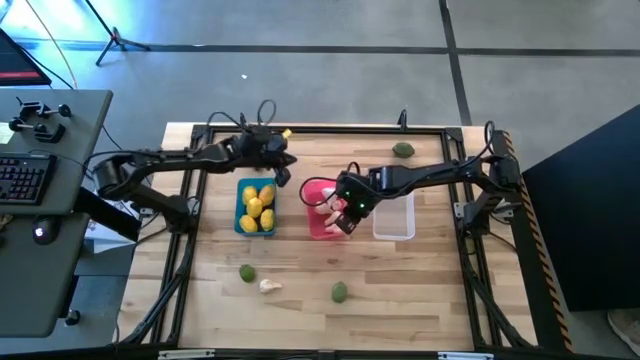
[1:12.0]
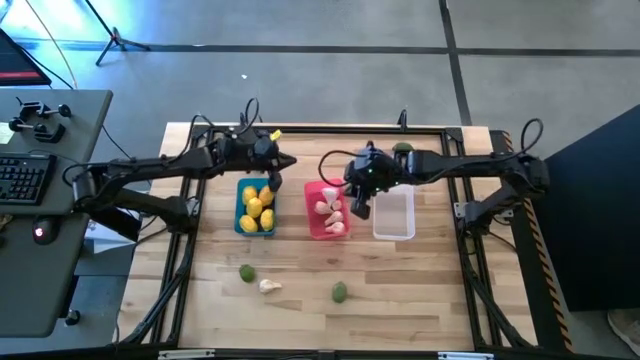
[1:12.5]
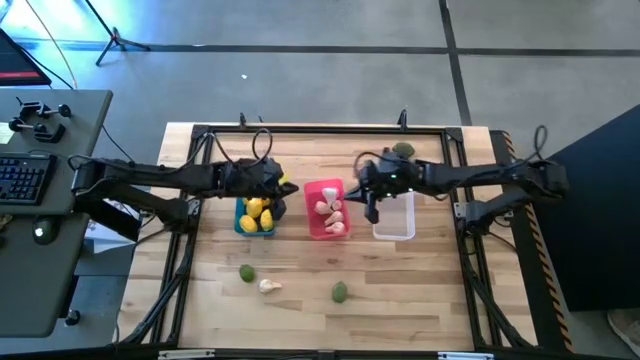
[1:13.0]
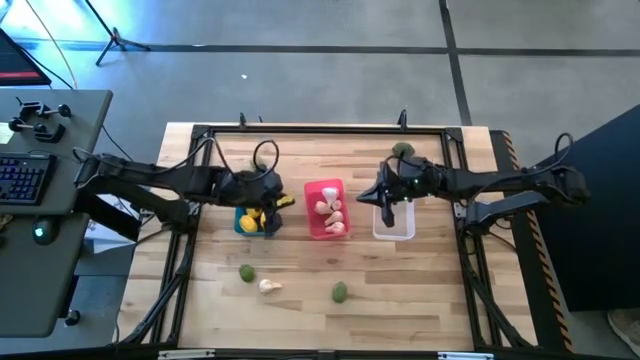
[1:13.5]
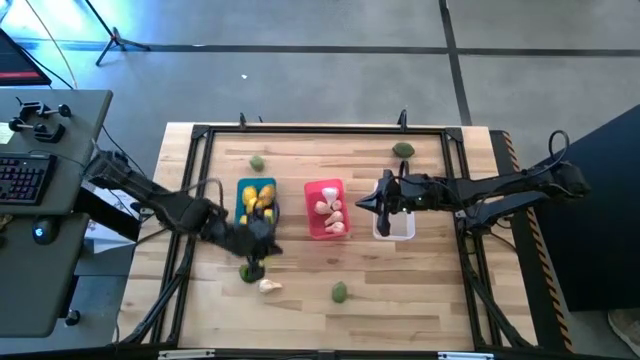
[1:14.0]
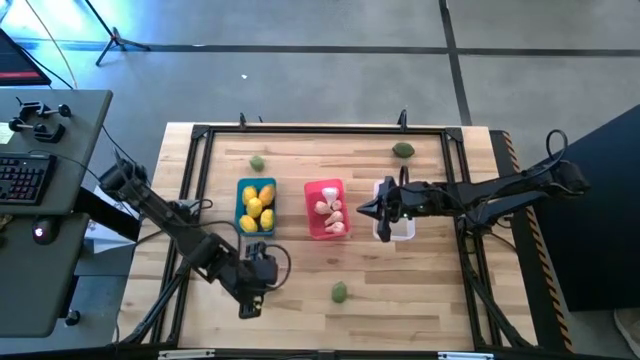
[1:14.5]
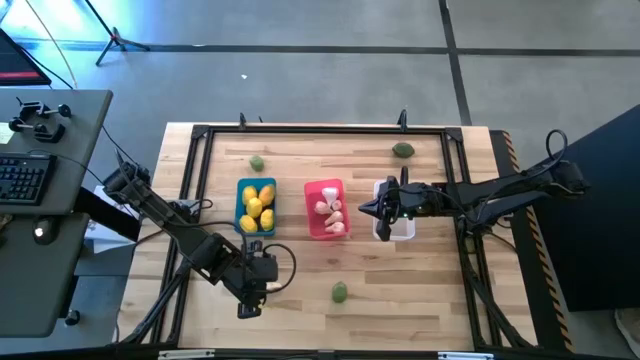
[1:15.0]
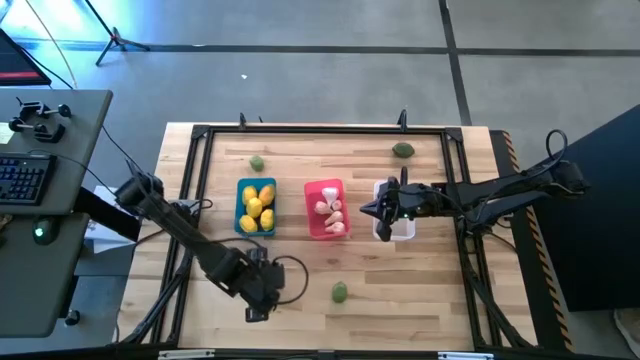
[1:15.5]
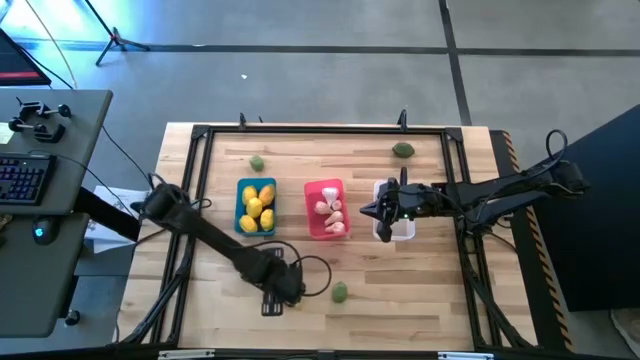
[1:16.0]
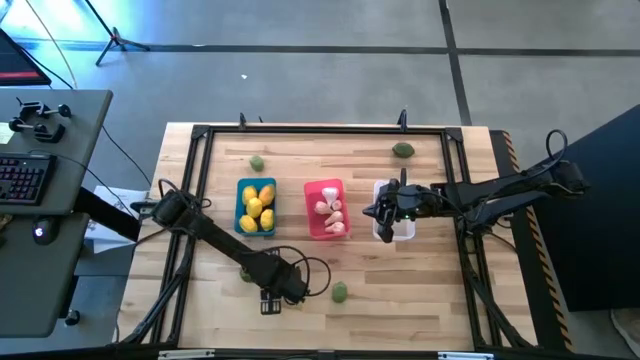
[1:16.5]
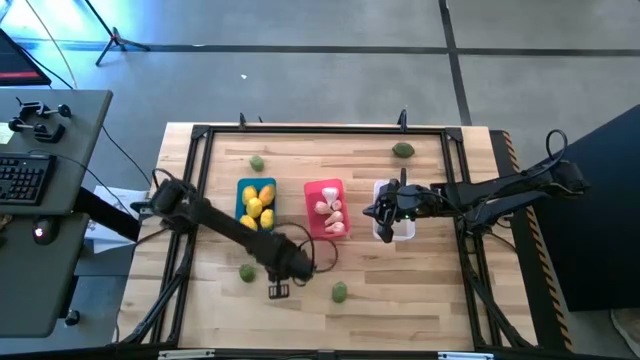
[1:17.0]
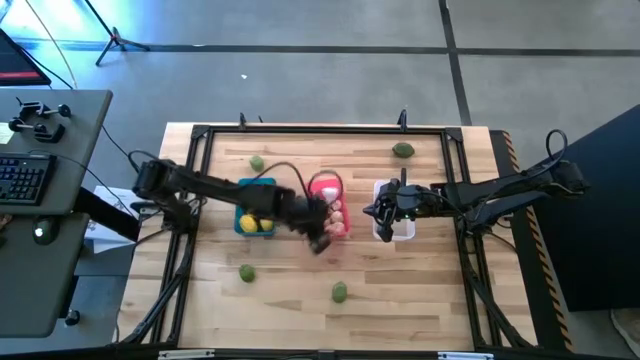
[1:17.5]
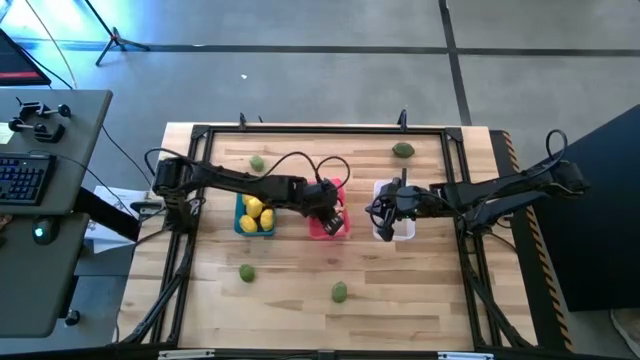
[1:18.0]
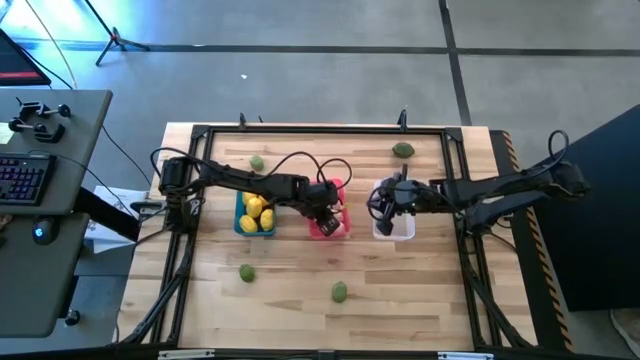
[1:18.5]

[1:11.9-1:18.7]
Task: Sort produce into baskets
Put the white garlic into the red bin

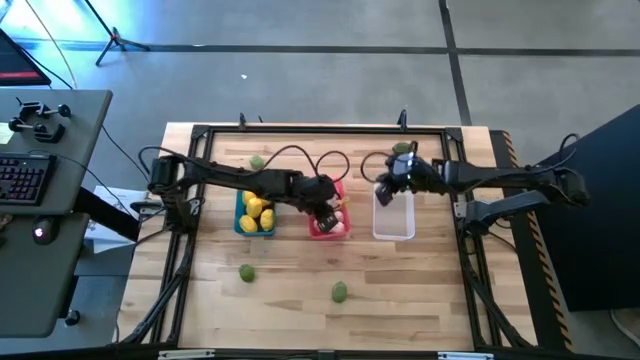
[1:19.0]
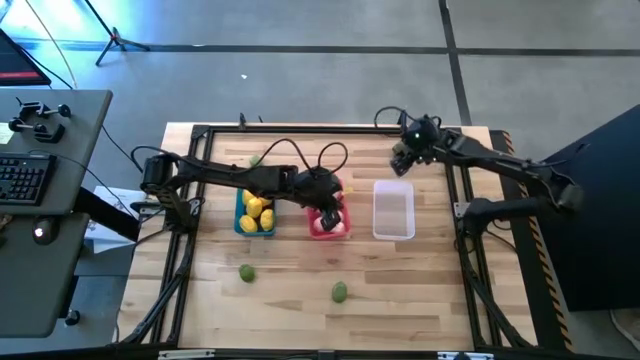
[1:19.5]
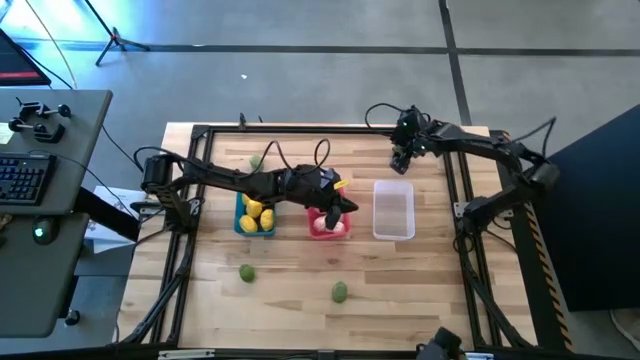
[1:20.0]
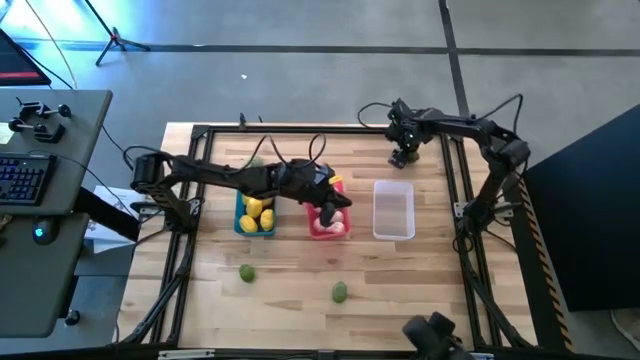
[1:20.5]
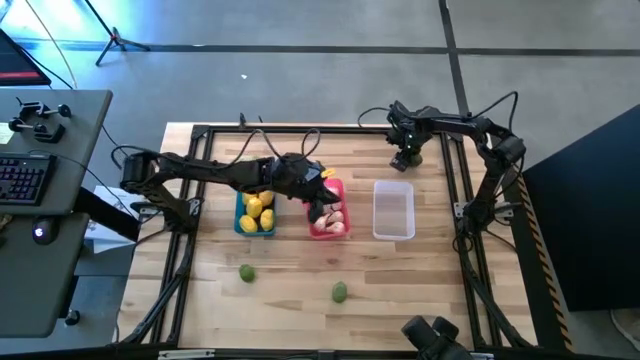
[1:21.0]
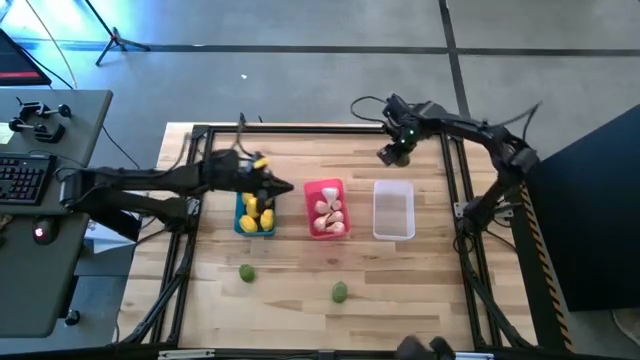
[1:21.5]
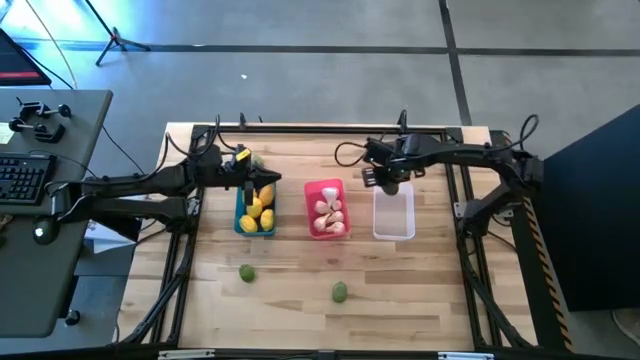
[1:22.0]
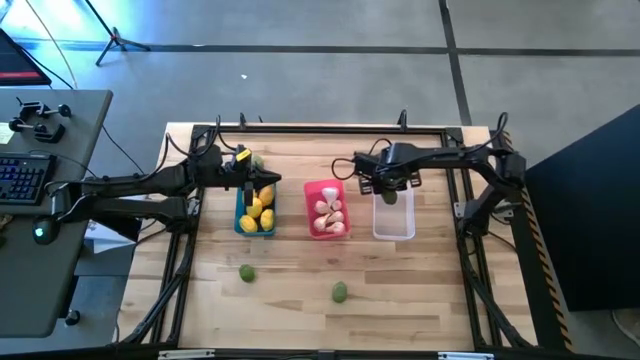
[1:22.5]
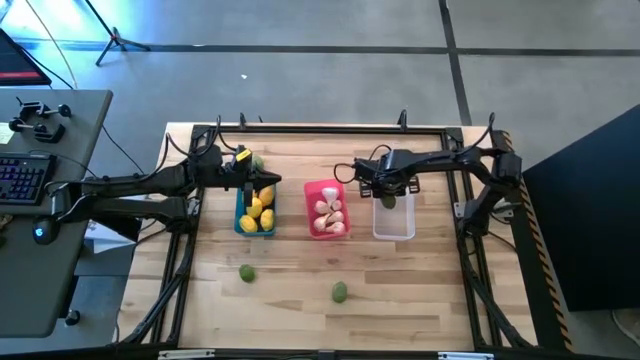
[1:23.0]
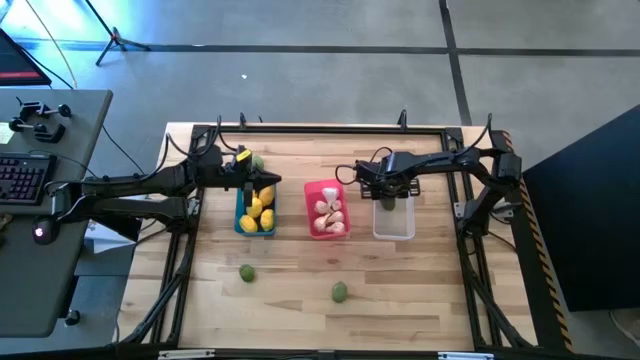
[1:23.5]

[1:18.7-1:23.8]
Put the top right green lime into the white bin

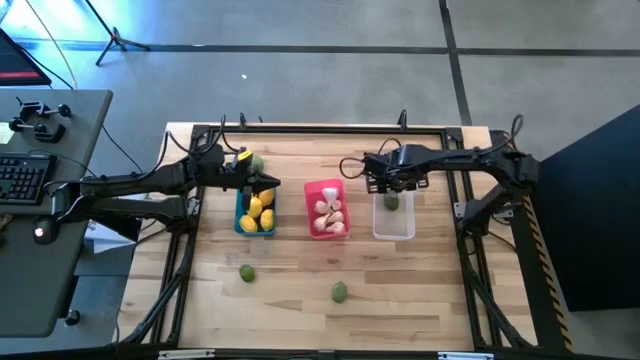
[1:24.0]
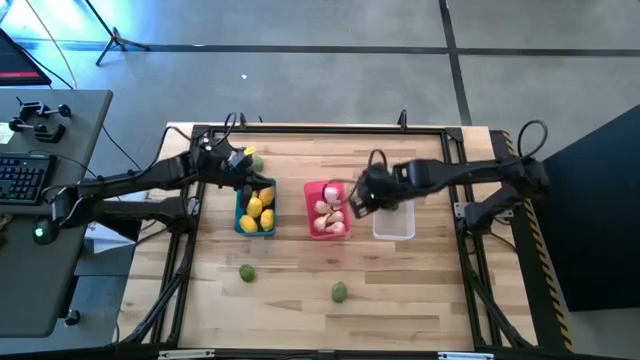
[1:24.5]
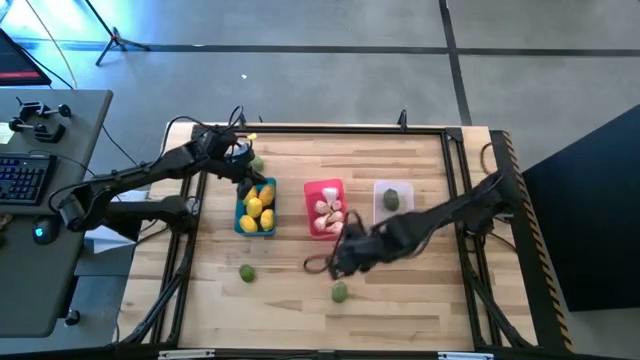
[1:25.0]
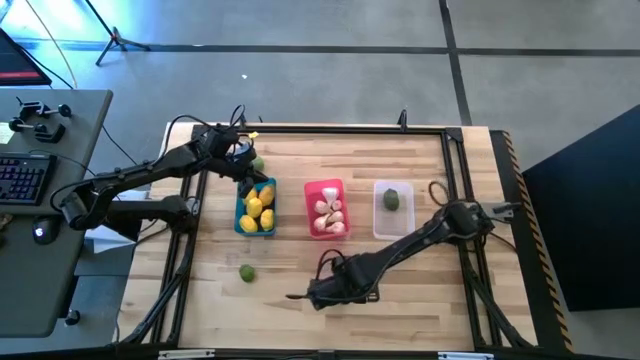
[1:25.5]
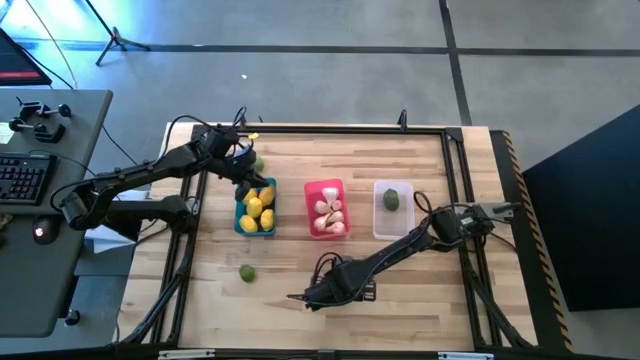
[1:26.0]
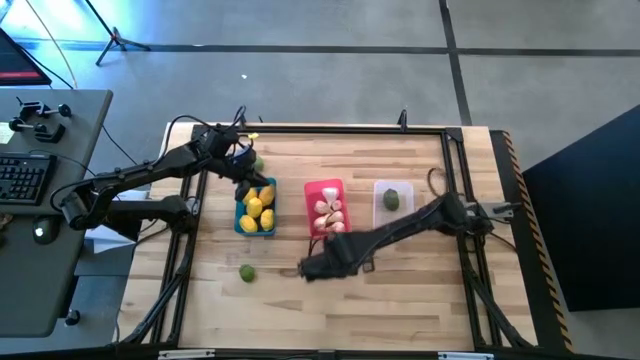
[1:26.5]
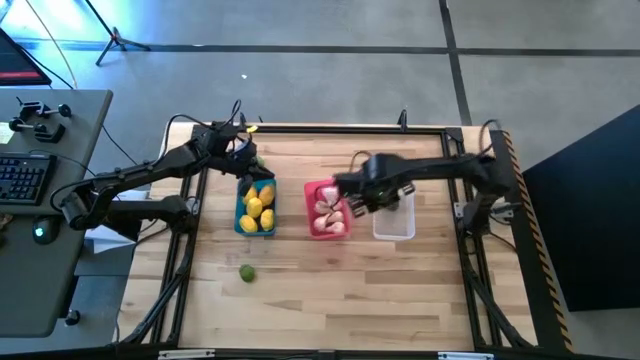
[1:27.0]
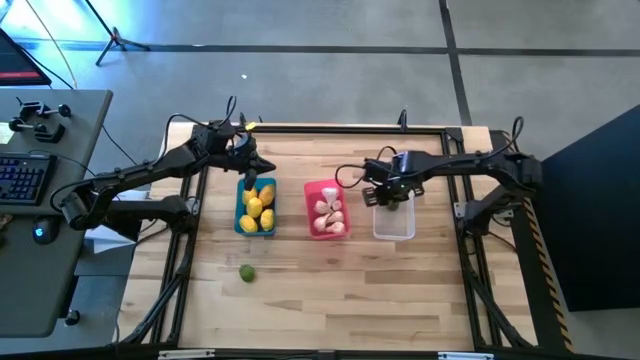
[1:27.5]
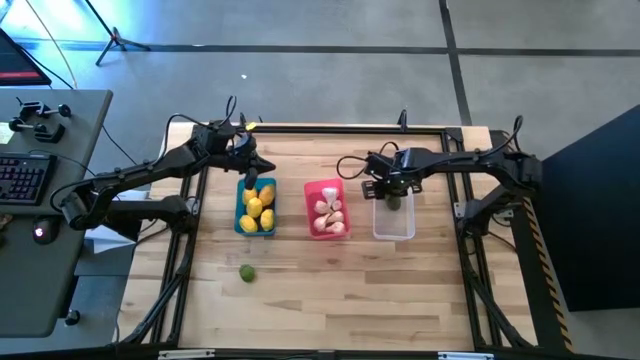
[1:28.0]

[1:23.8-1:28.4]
Put the bottom right green lime into the white bin

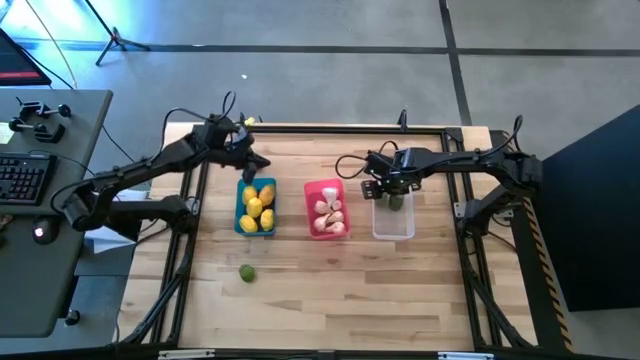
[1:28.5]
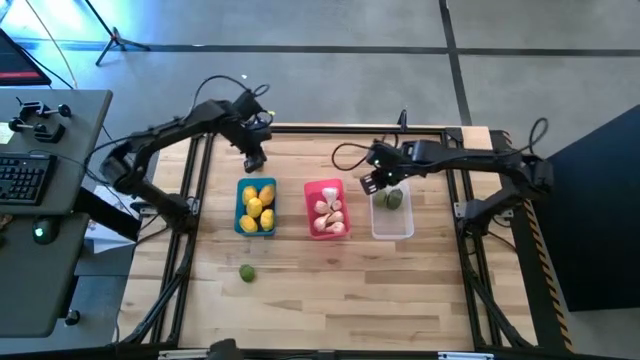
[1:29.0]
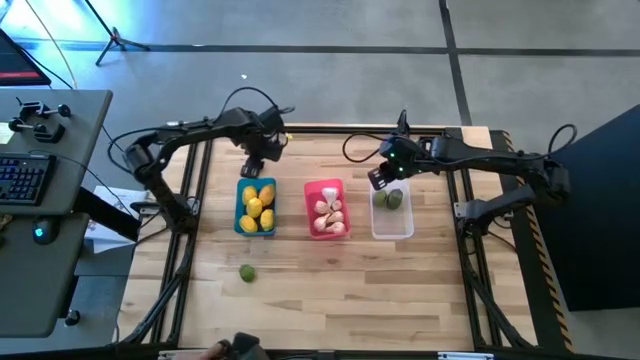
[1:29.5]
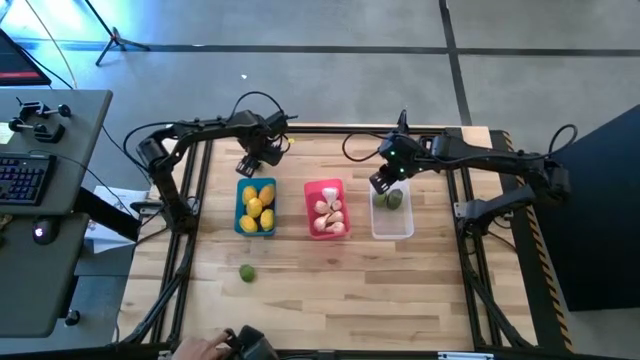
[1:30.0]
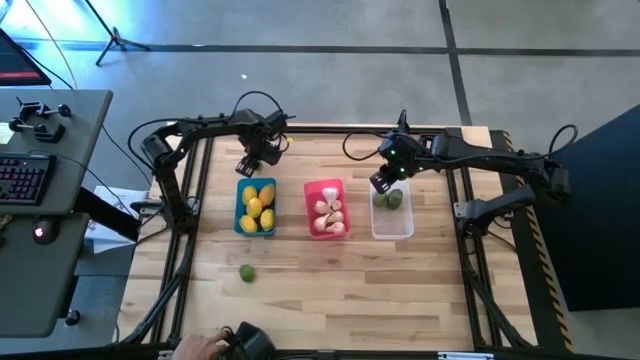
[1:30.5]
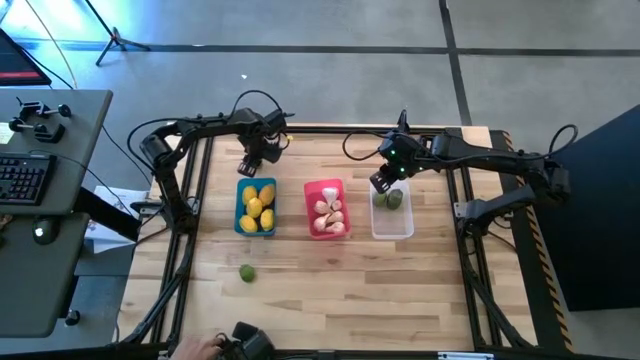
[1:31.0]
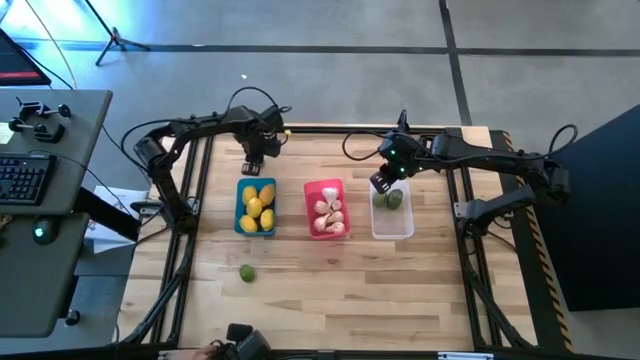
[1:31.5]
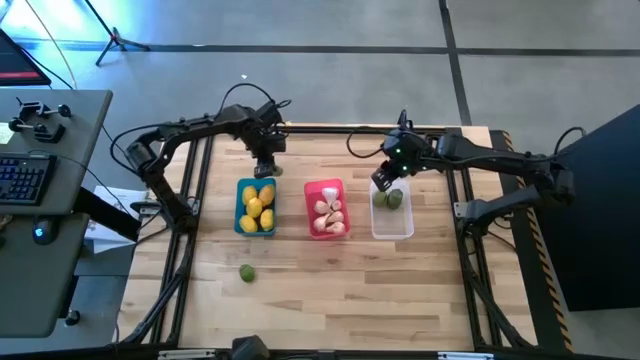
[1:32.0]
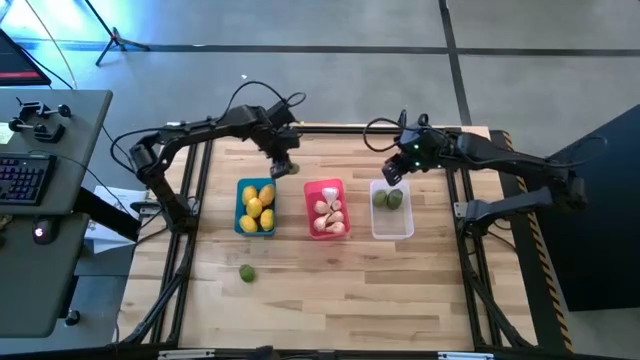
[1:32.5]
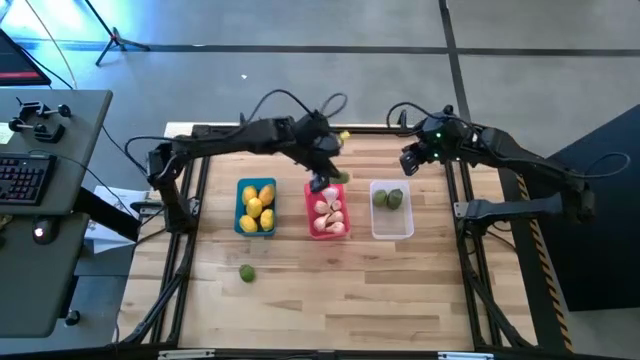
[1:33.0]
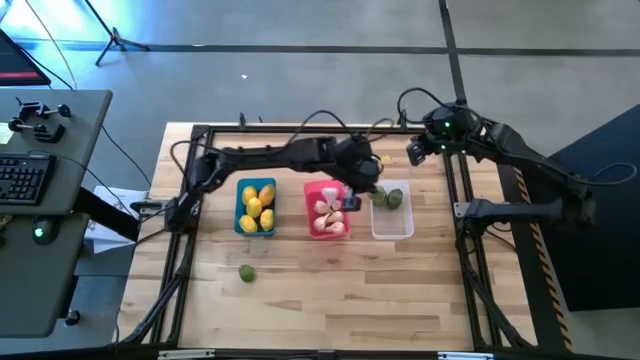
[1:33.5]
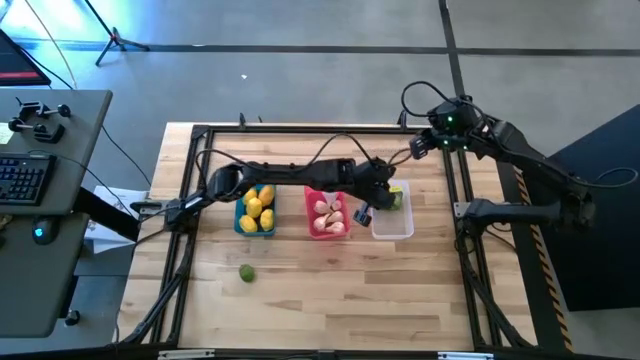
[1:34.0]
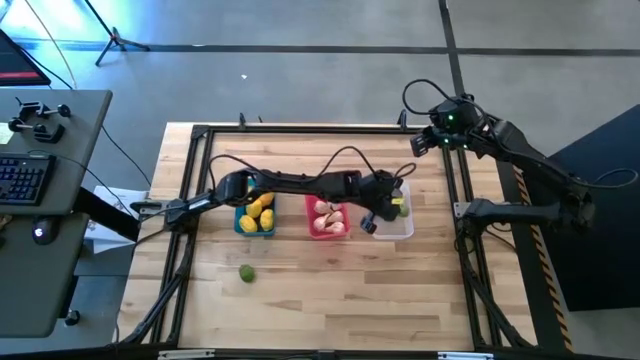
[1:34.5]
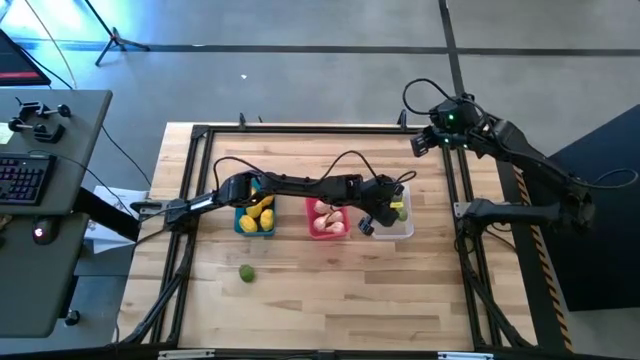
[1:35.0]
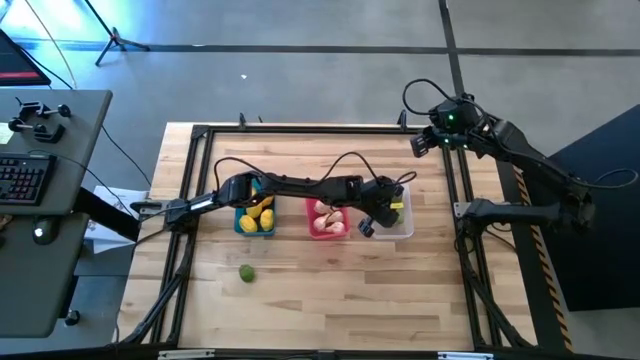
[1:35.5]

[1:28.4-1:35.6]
Put the top green lime into the white bin
